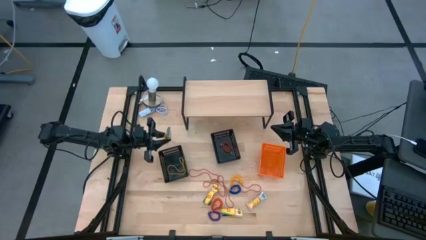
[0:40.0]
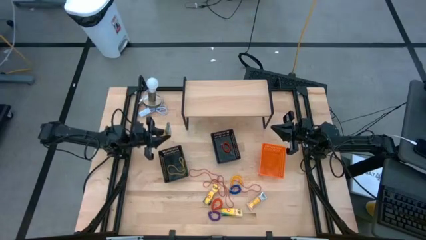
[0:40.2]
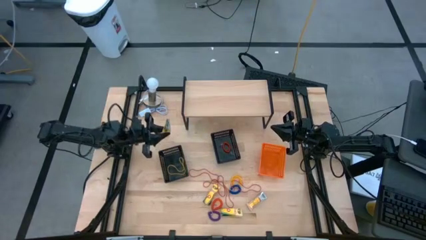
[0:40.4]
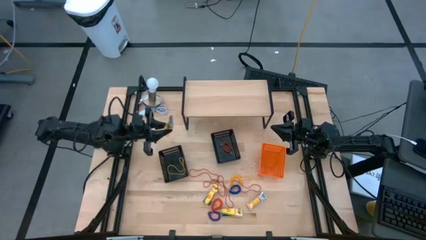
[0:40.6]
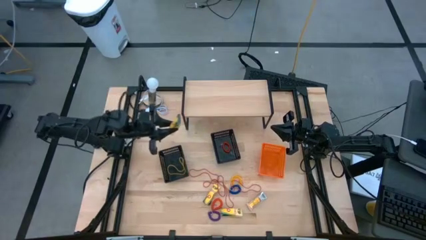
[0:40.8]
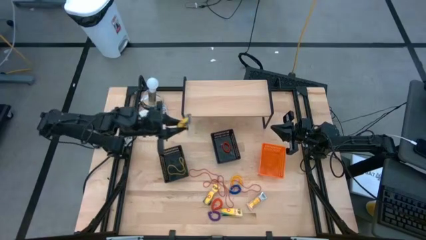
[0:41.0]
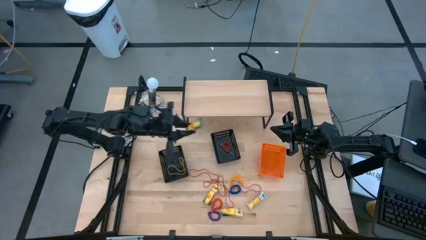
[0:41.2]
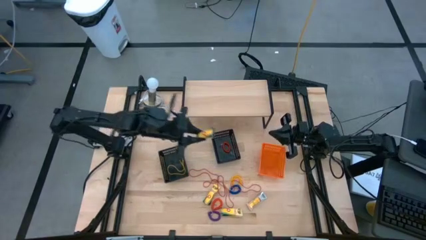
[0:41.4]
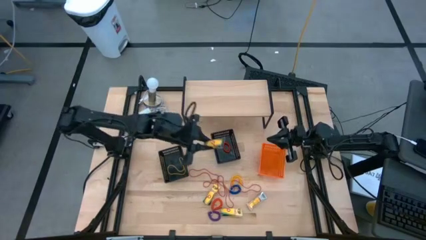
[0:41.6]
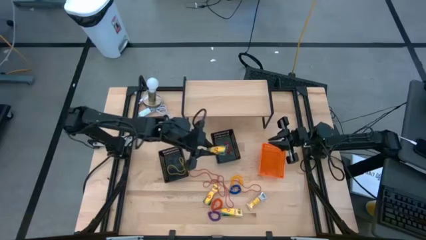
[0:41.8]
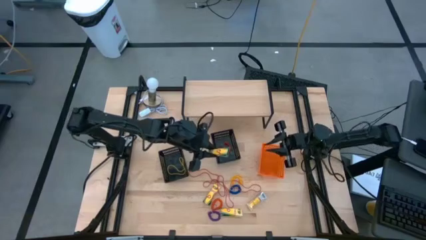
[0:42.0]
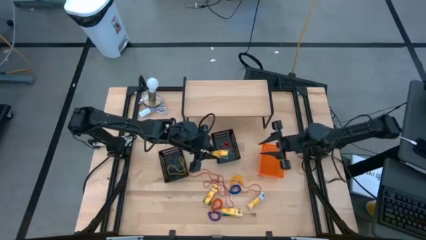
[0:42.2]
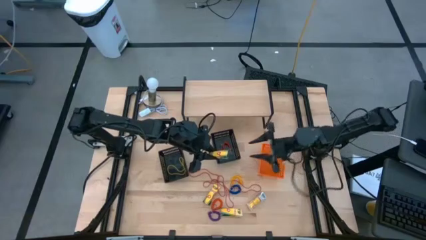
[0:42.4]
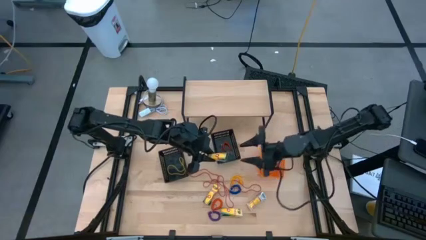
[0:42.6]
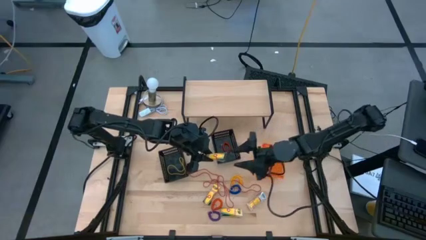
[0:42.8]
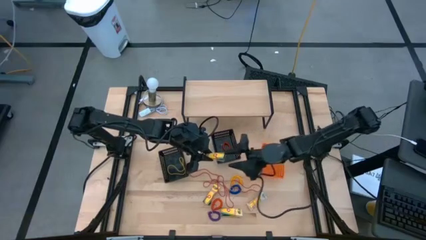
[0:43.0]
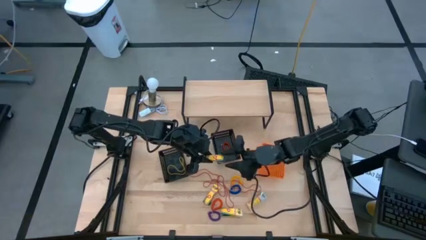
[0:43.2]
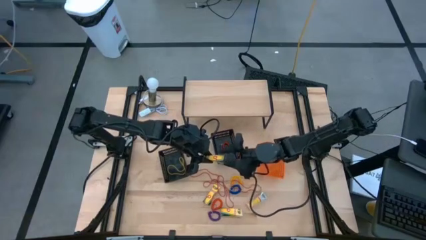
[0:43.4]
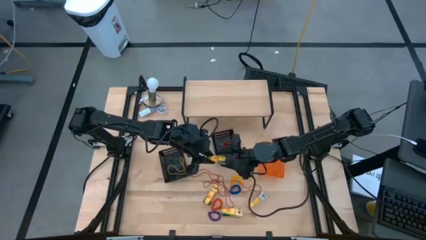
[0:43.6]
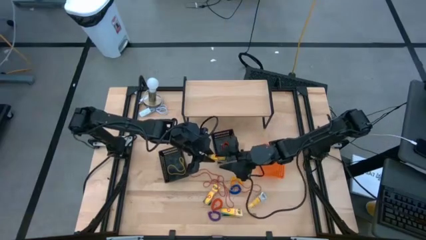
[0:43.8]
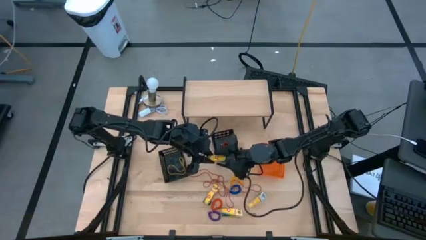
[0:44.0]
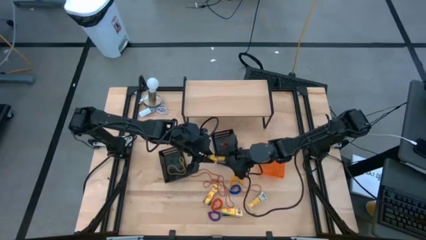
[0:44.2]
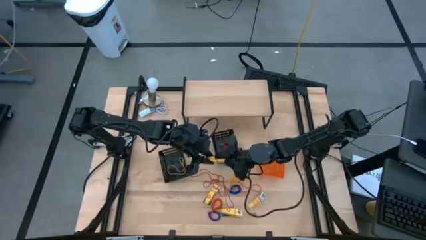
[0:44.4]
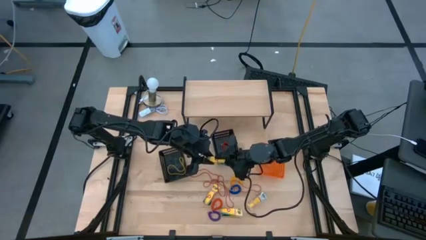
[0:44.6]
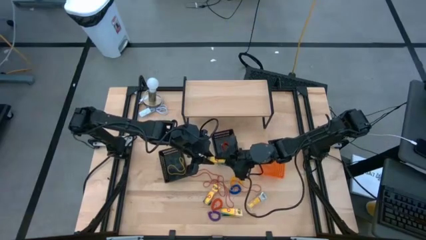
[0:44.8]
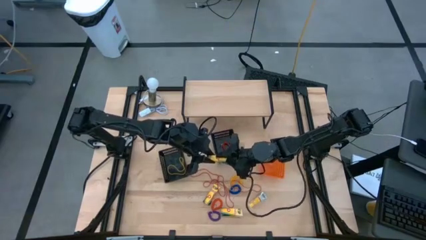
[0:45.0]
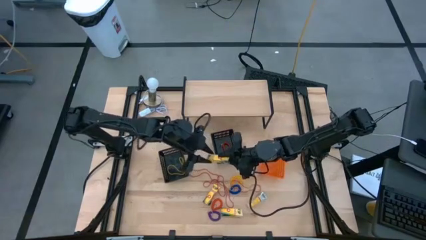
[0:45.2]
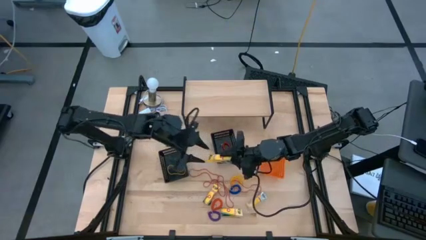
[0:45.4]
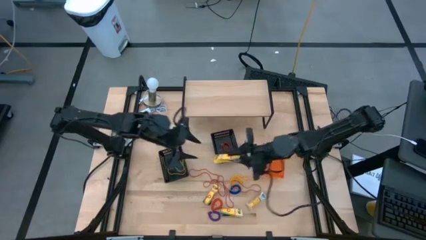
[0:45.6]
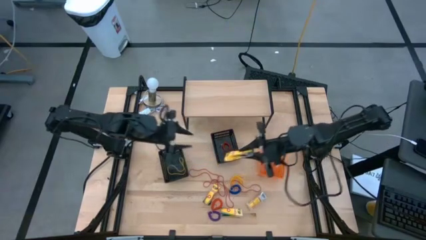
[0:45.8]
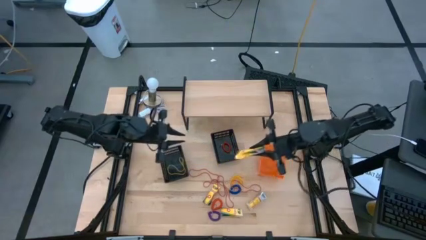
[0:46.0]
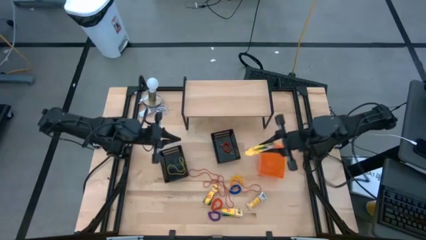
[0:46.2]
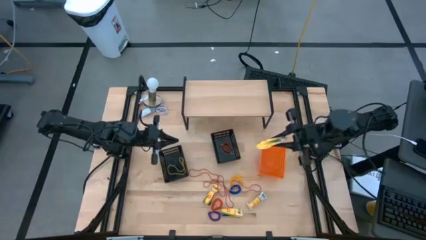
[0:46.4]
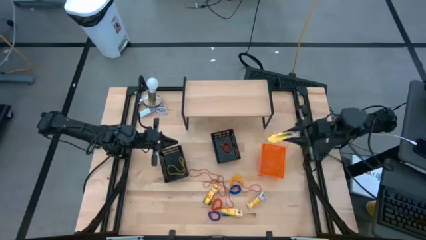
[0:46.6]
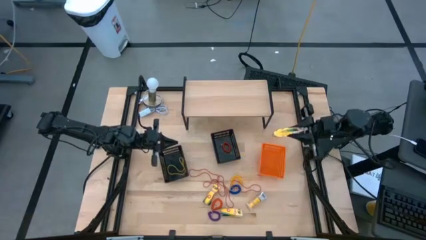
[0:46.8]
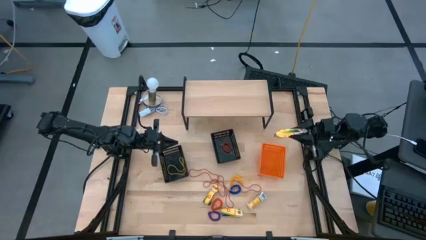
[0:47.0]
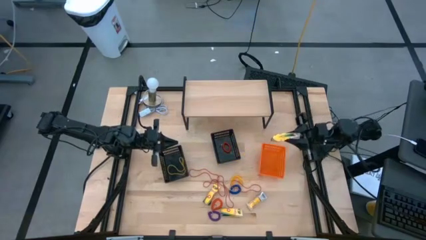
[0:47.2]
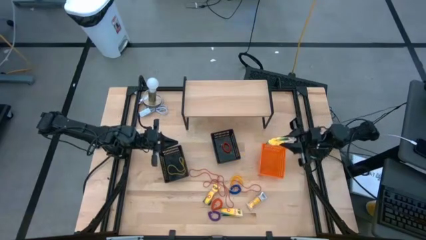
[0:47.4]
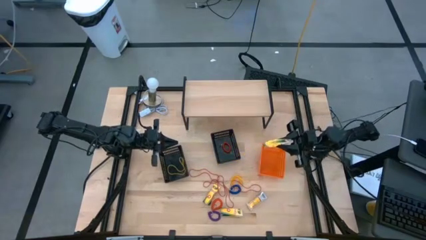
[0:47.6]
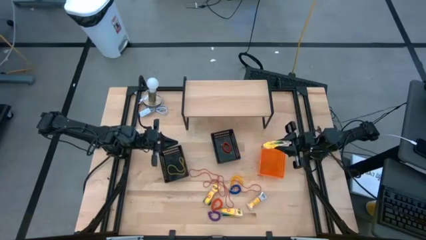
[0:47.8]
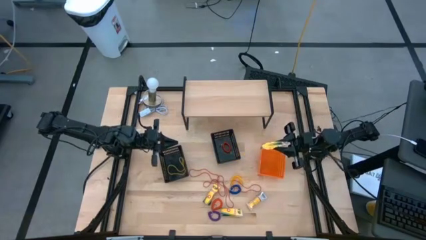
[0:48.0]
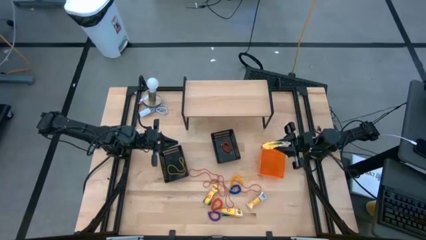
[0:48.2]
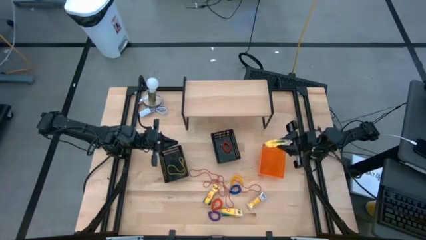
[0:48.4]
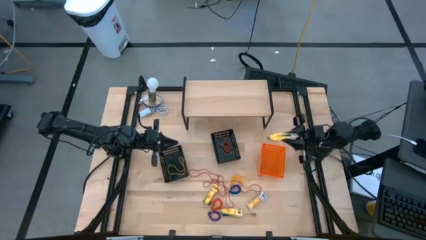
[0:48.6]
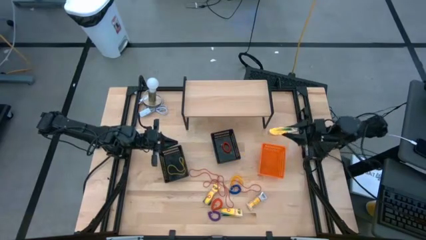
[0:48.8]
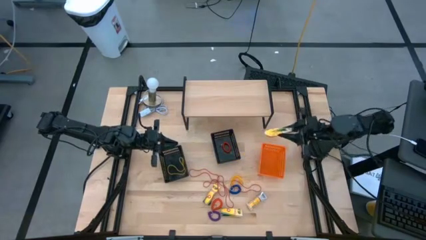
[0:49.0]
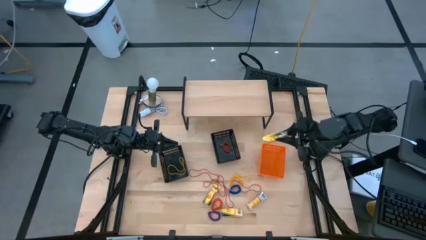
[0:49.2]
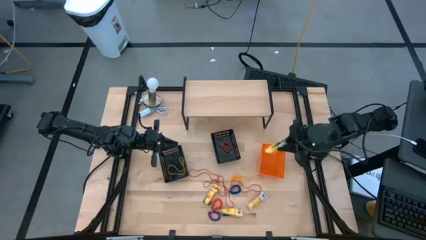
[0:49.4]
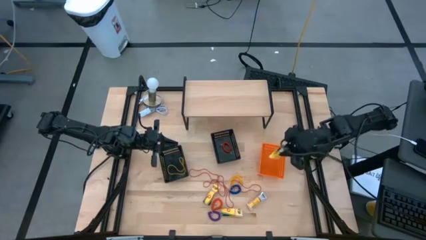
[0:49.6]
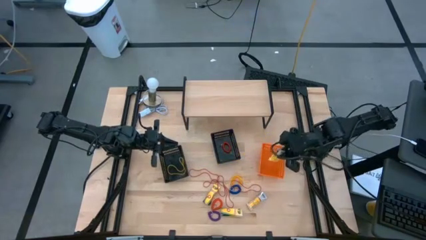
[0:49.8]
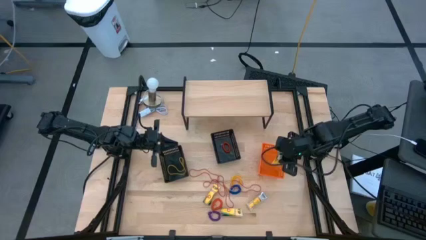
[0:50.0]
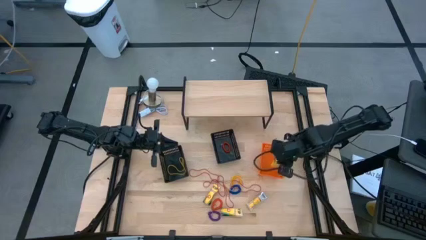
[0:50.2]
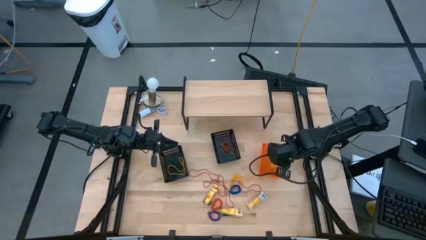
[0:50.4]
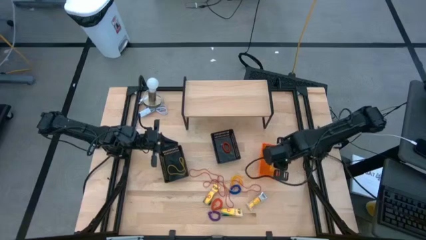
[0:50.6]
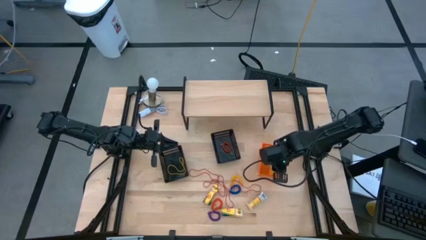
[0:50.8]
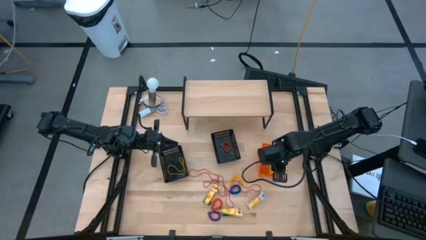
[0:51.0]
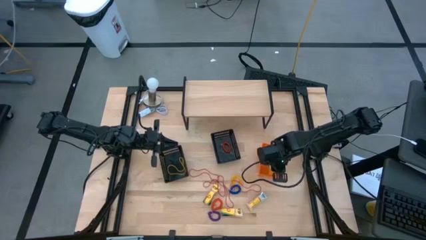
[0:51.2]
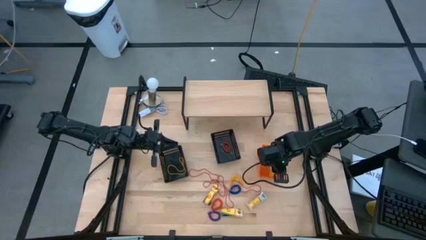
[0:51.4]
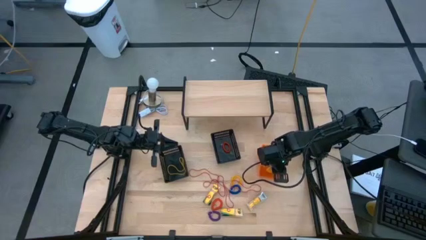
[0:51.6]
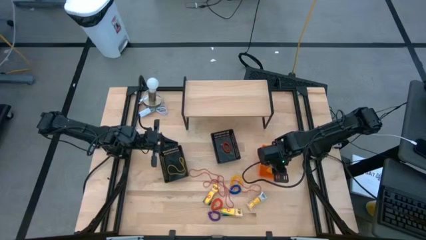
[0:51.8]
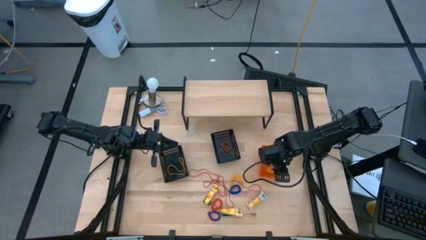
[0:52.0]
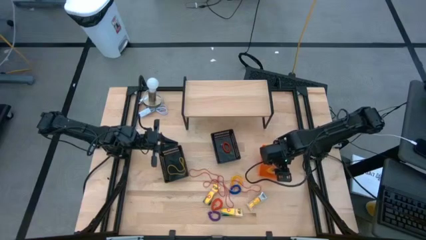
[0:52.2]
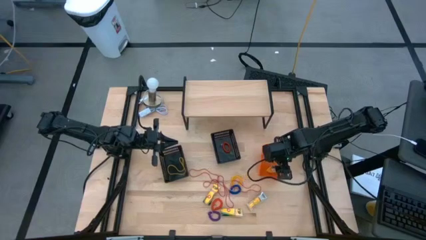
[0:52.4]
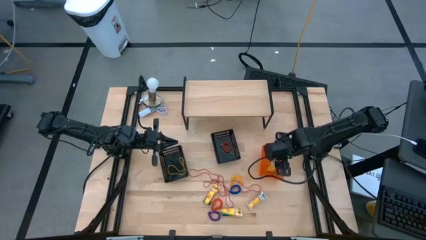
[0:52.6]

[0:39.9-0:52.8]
Task: Pick & Place Office Desk Supplies
Put the crayon box into the orange bin
